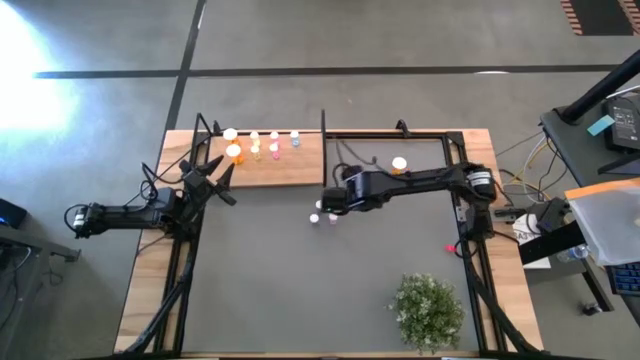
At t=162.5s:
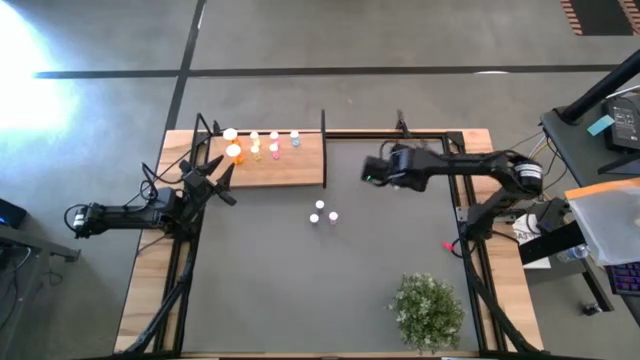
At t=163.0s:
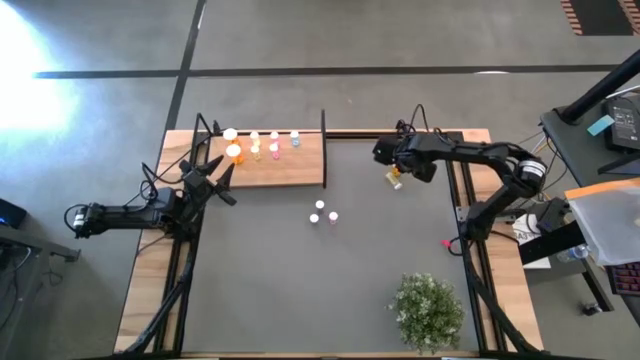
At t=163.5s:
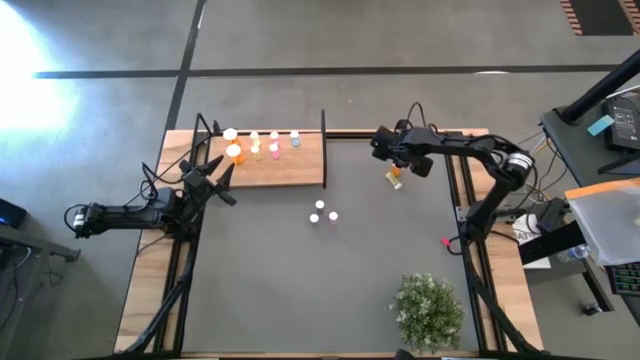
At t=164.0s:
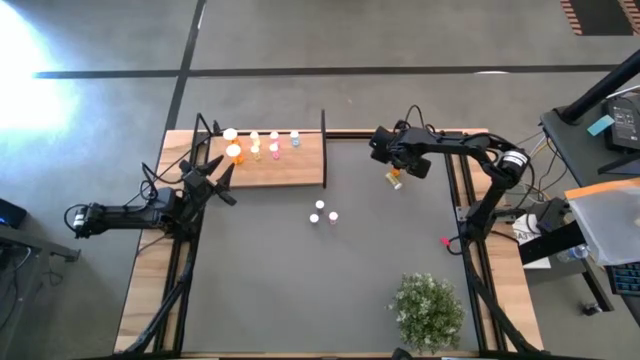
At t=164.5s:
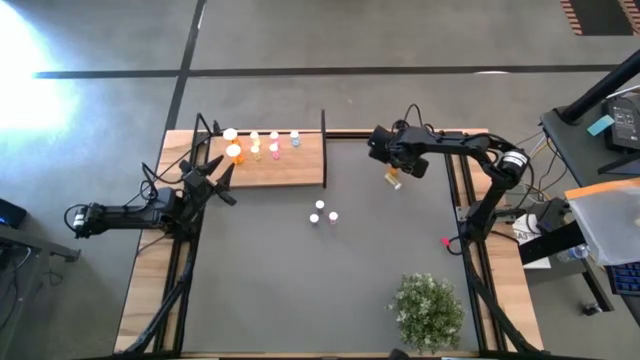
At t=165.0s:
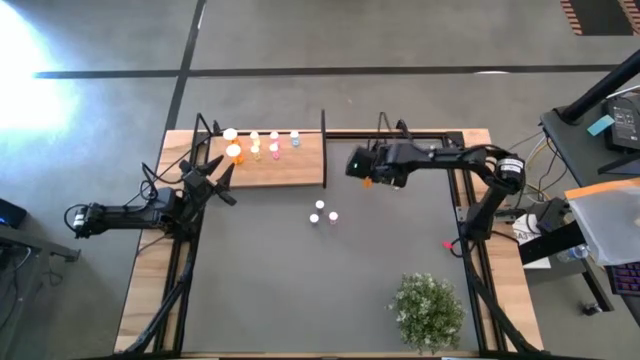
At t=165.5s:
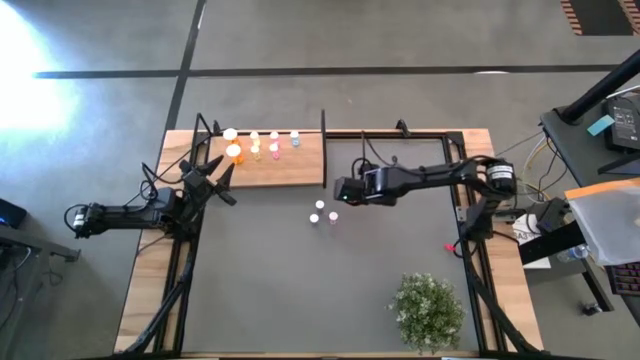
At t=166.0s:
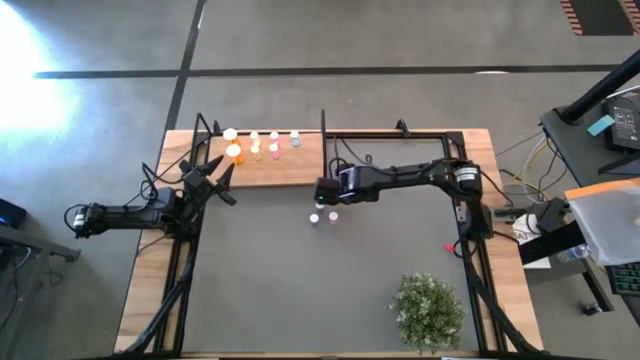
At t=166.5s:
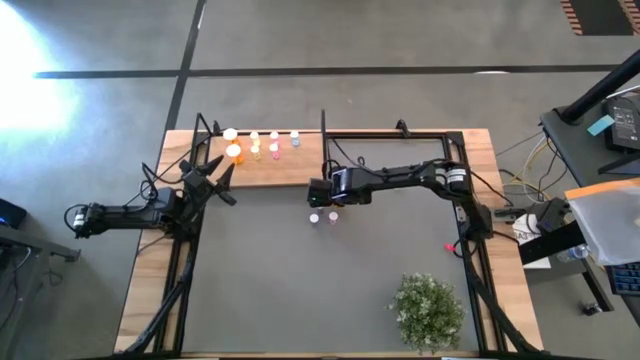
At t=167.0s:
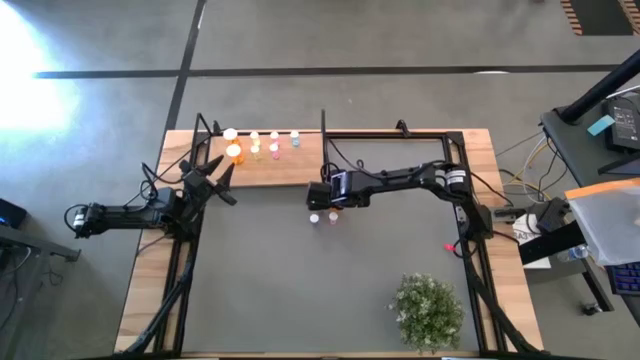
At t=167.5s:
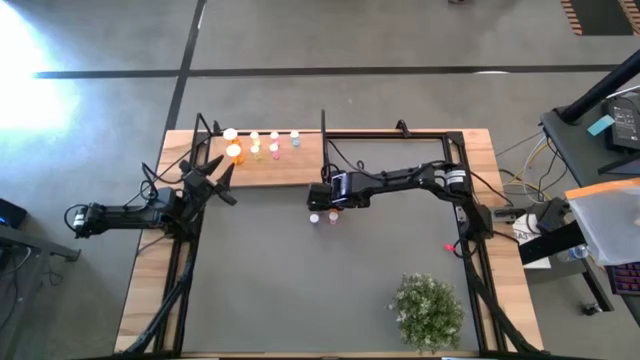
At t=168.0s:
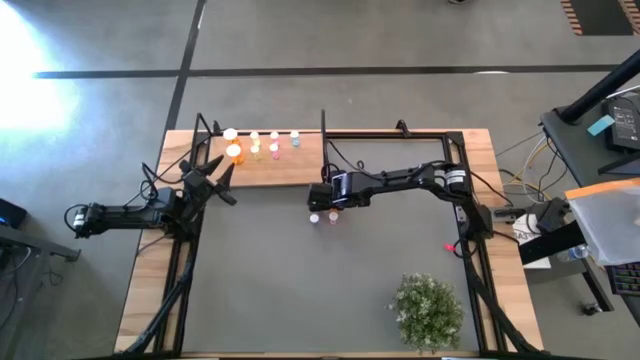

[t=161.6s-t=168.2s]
Task: Pick and place medicine bottles onto shelf by color
Move the orange pill bottle to the middle of the table

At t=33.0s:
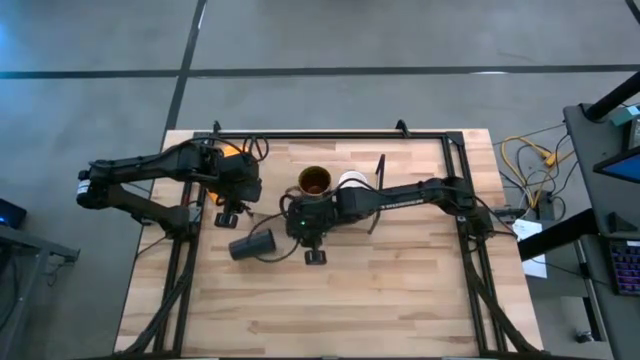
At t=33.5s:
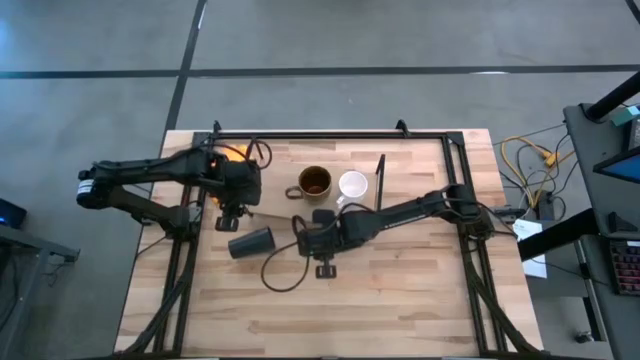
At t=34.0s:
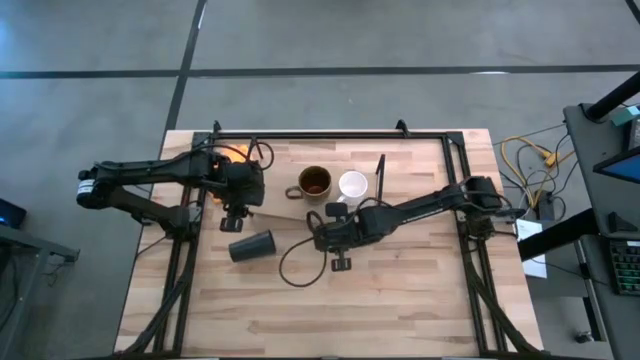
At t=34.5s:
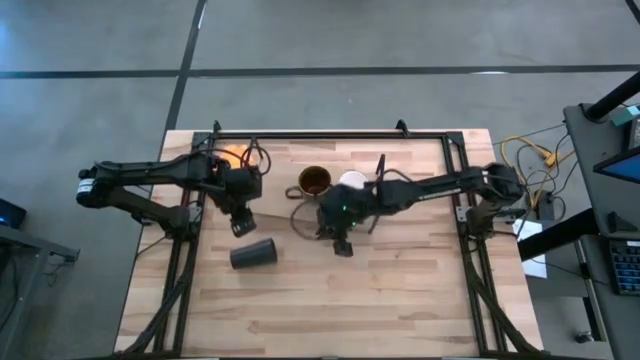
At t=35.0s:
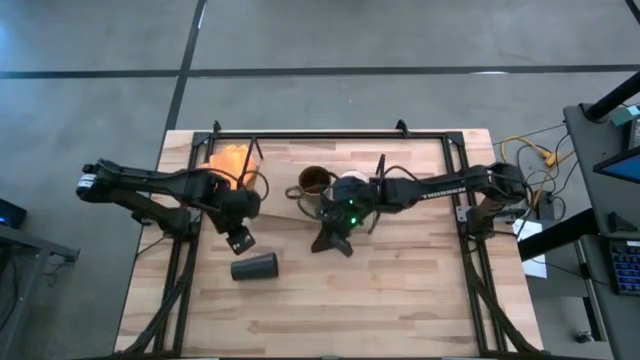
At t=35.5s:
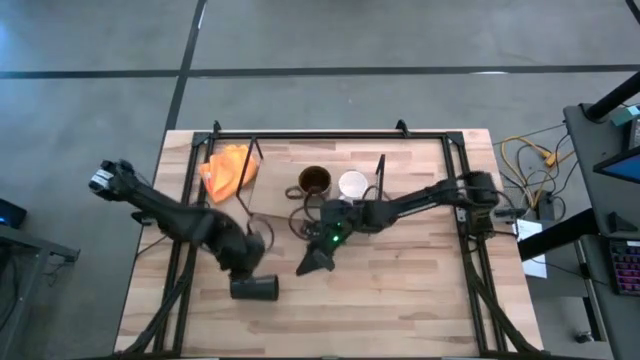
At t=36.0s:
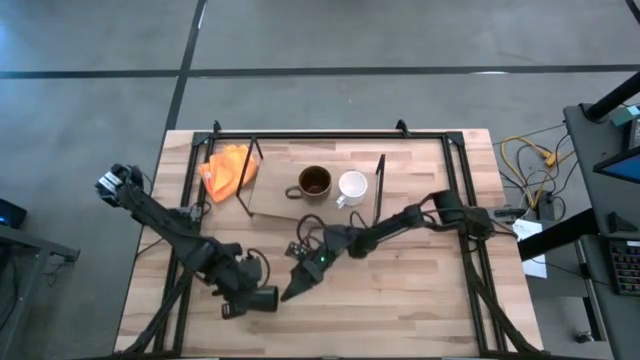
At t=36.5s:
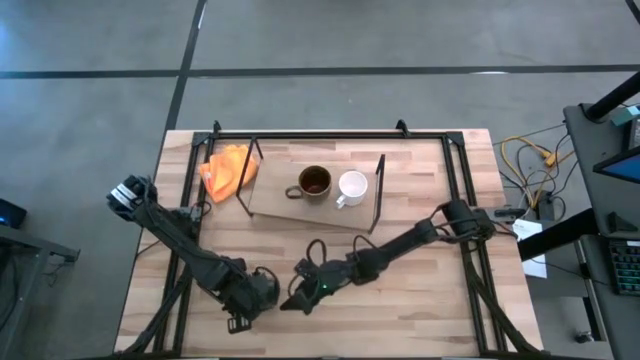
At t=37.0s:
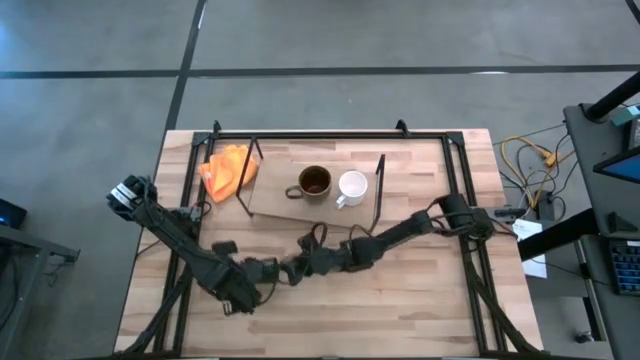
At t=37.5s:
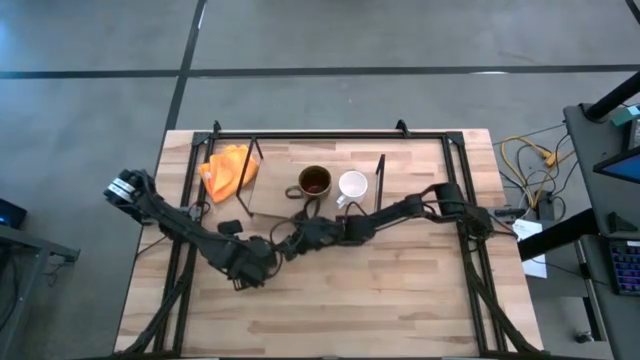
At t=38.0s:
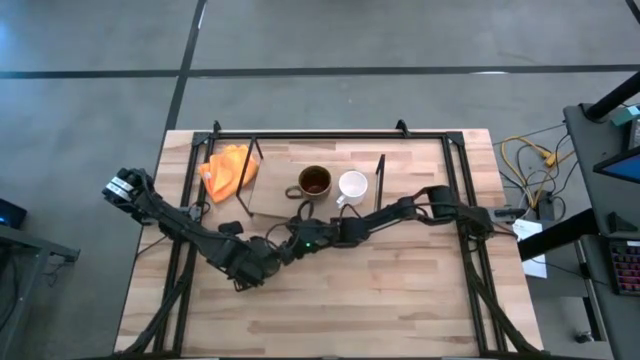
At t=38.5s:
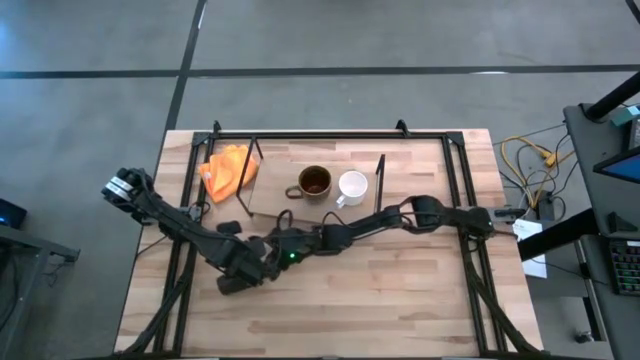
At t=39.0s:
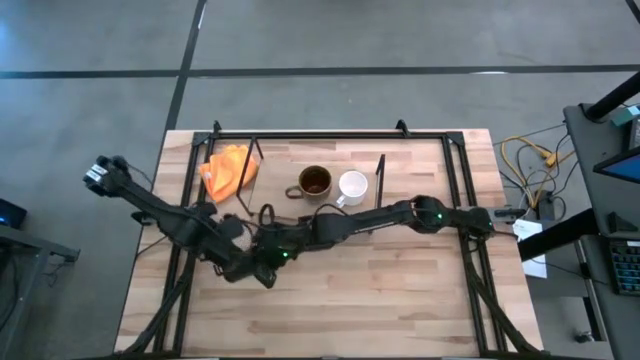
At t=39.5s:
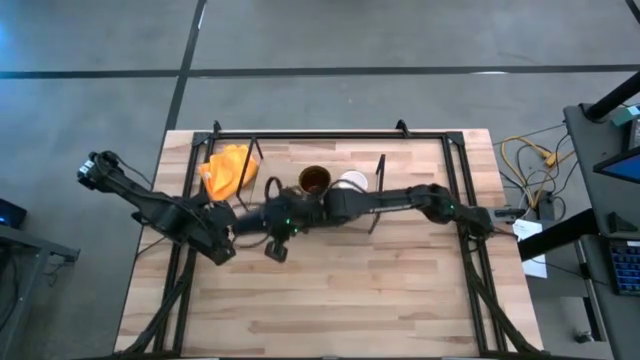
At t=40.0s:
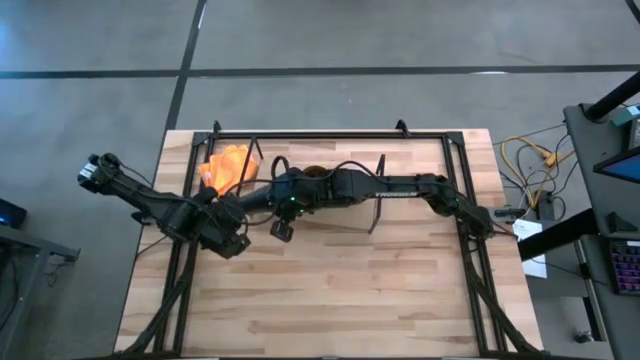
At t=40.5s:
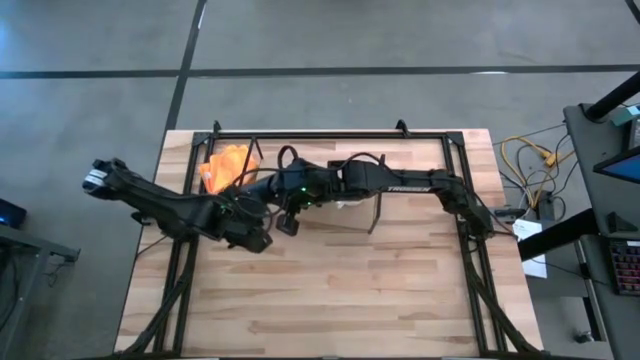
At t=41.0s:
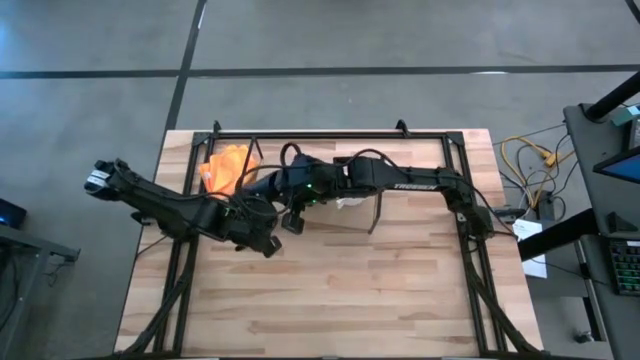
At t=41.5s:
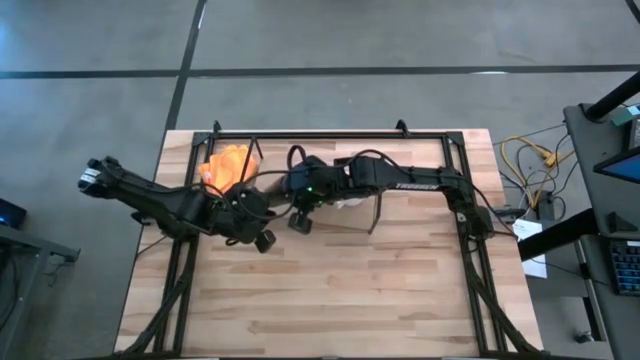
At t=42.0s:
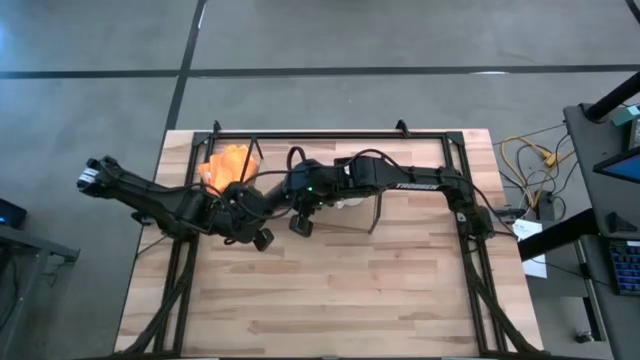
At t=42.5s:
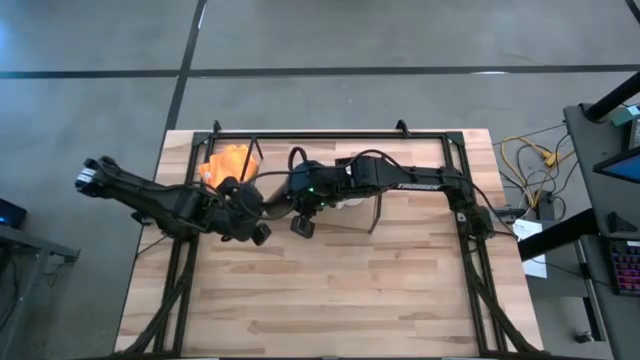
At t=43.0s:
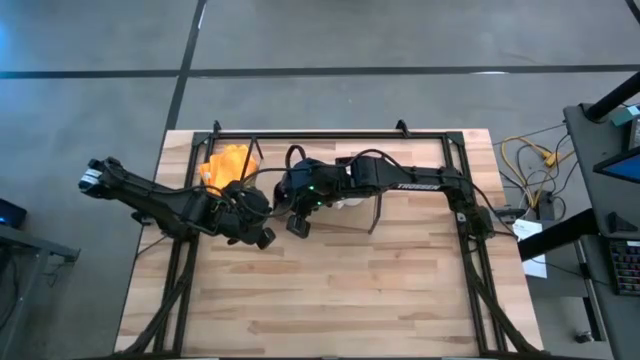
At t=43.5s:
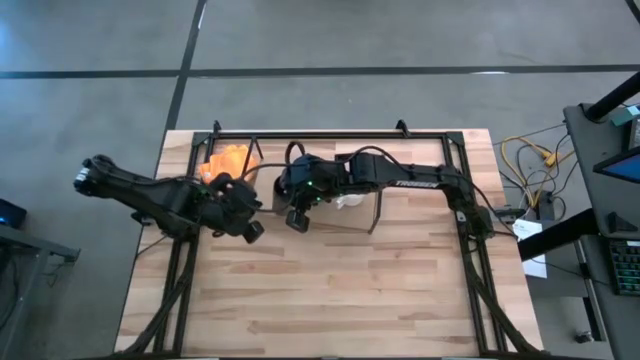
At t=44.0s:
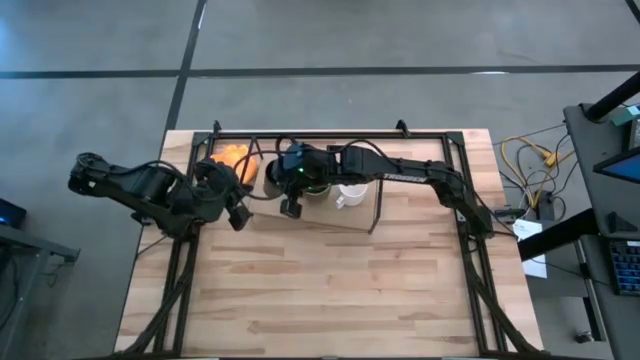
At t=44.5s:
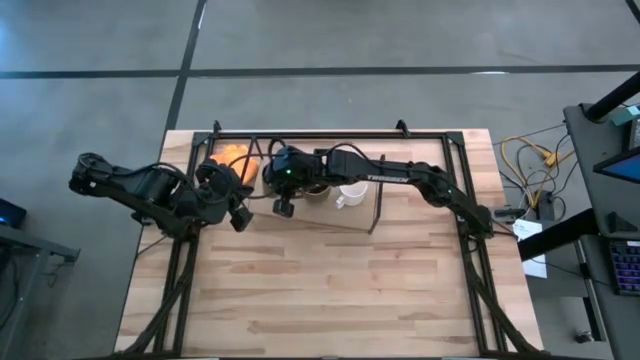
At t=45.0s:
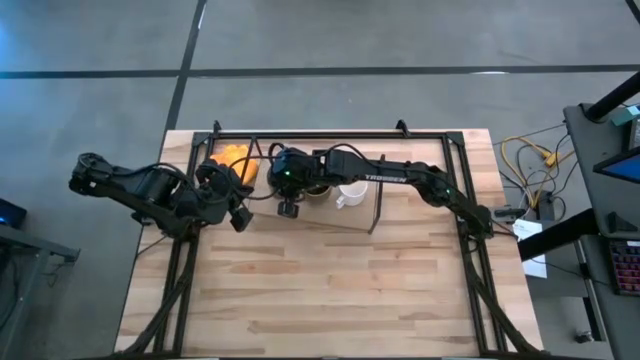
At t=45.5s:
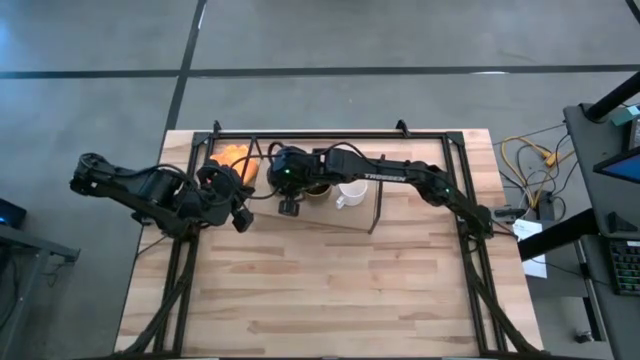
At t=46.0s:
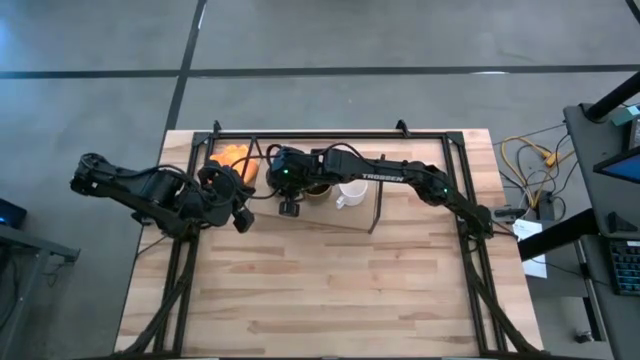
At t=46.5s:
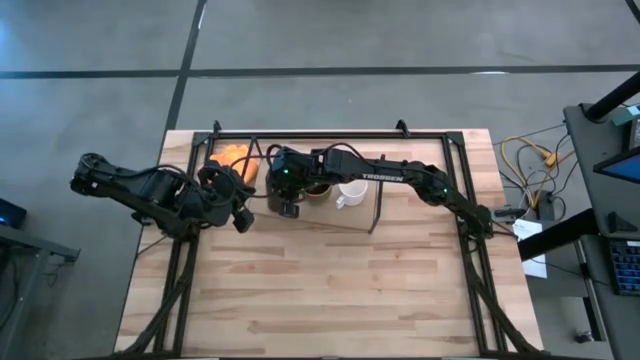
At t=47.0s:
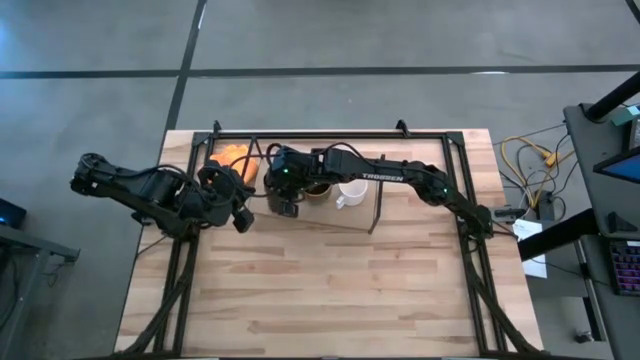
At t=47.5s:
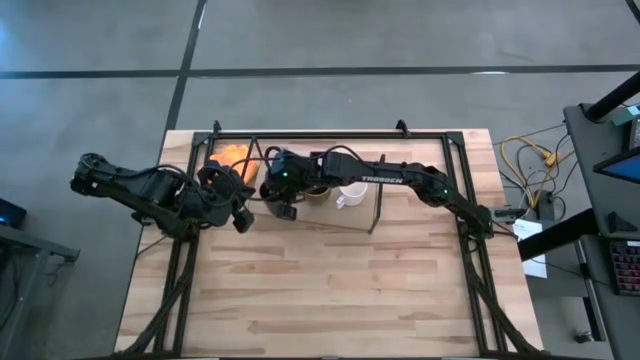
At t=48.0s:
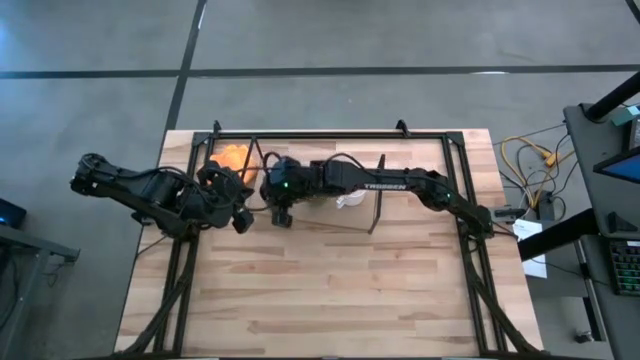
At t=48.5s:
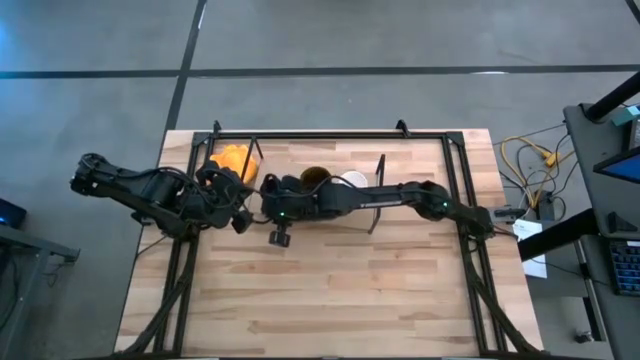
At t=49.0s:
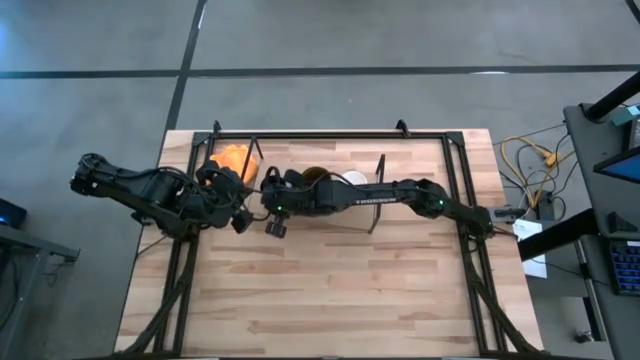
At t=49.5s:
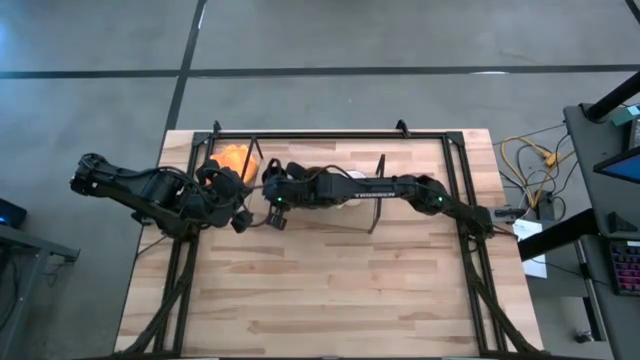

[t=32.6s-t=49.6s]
Task: Stack small to large cups/mugs on shelf
Put the black cup on the shelf
